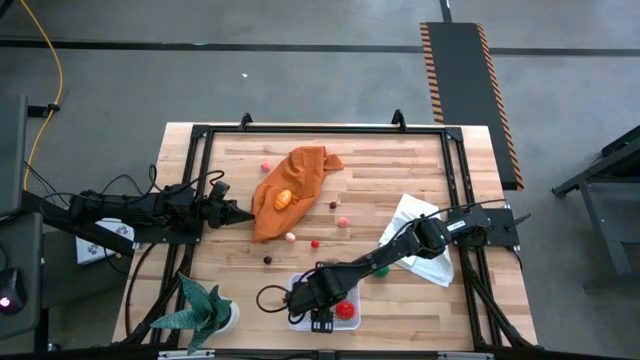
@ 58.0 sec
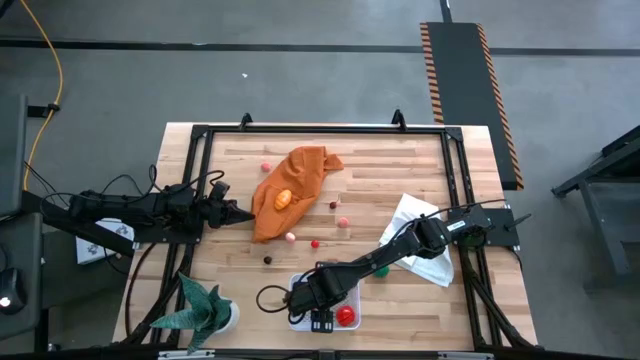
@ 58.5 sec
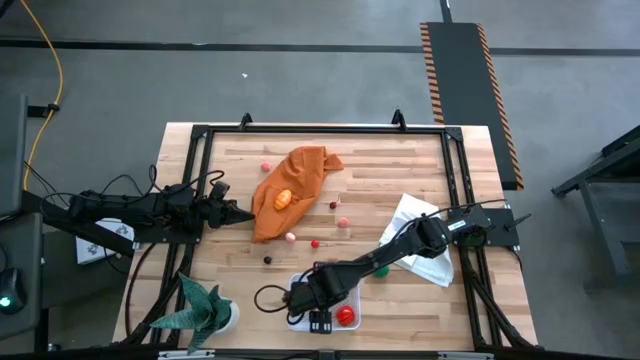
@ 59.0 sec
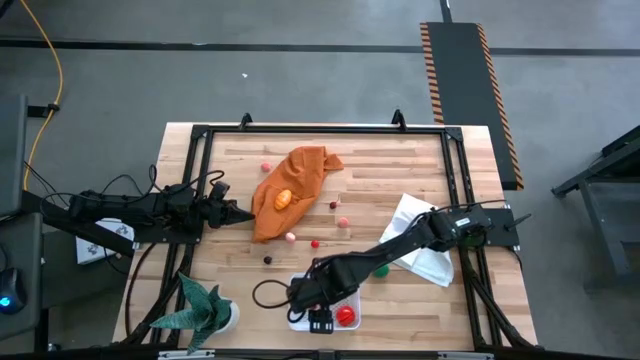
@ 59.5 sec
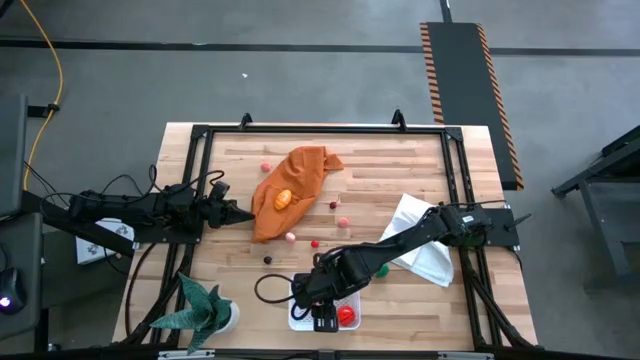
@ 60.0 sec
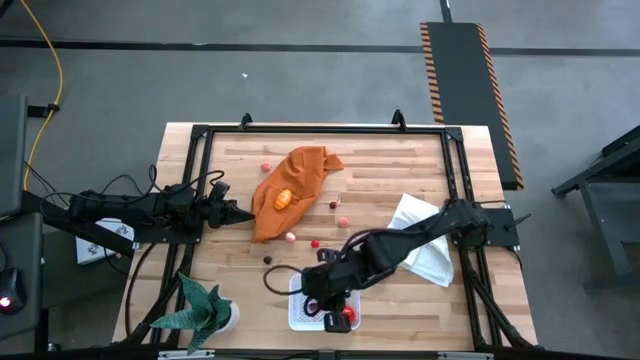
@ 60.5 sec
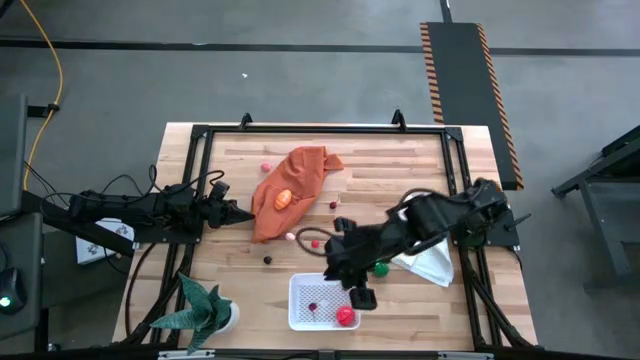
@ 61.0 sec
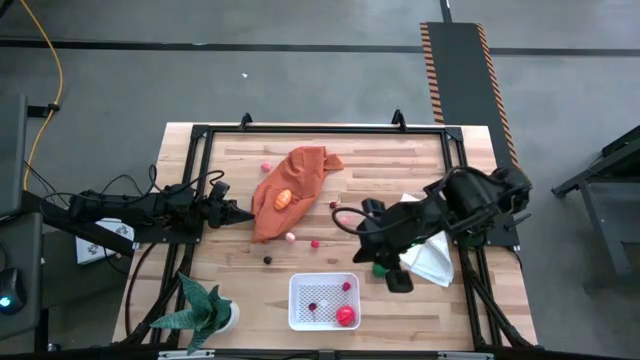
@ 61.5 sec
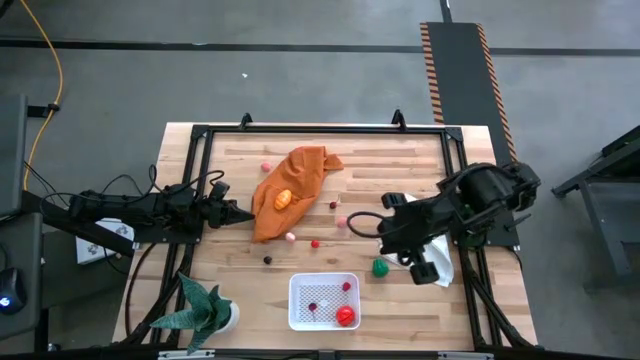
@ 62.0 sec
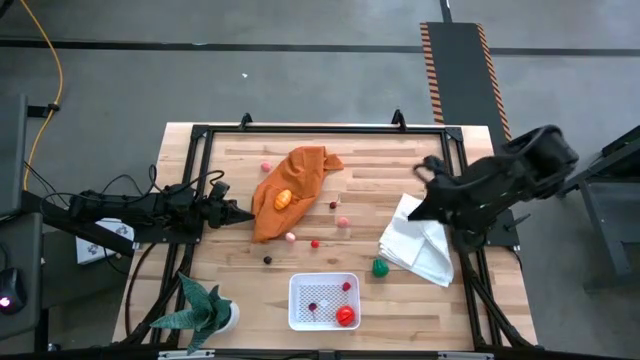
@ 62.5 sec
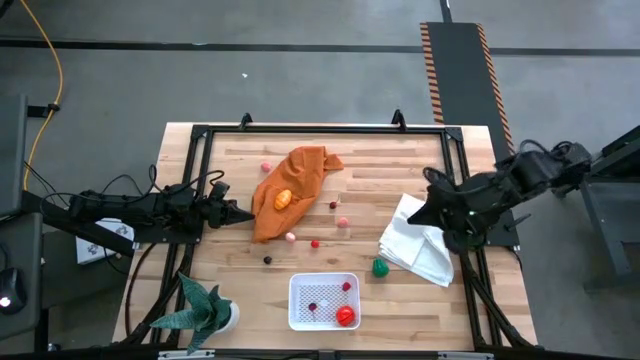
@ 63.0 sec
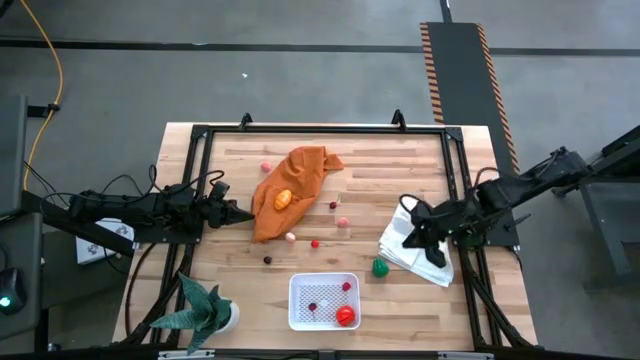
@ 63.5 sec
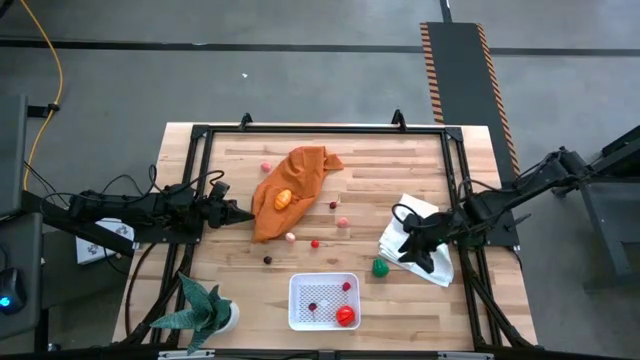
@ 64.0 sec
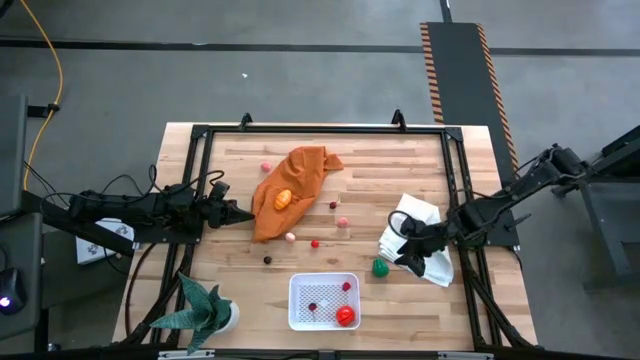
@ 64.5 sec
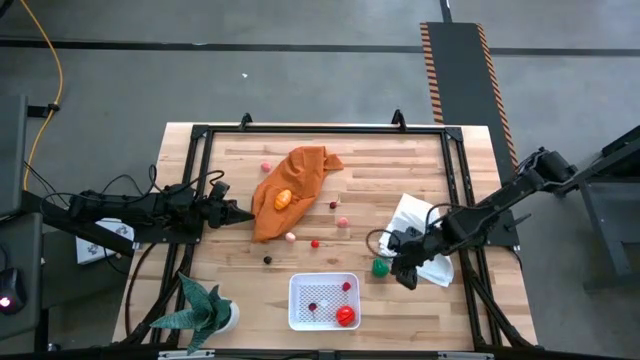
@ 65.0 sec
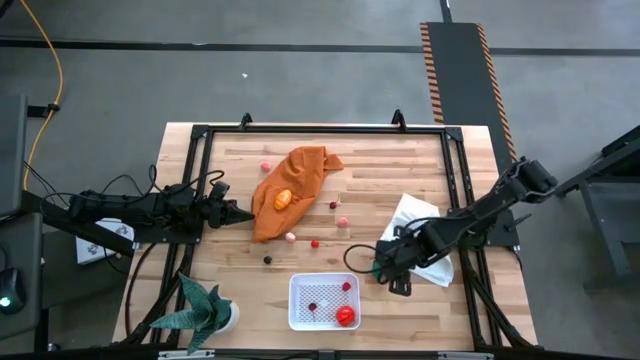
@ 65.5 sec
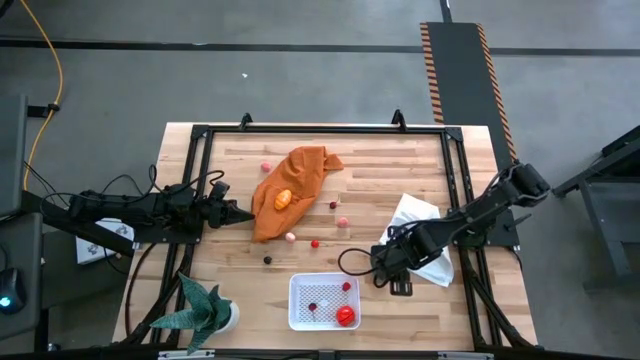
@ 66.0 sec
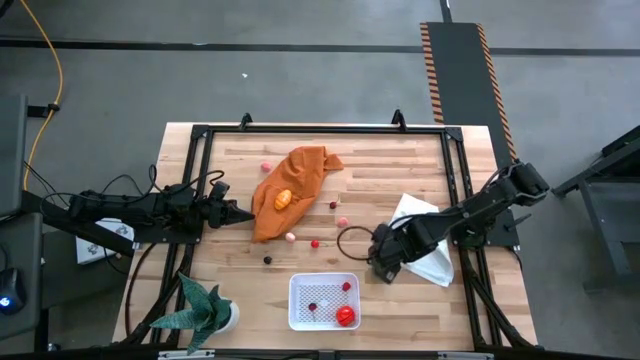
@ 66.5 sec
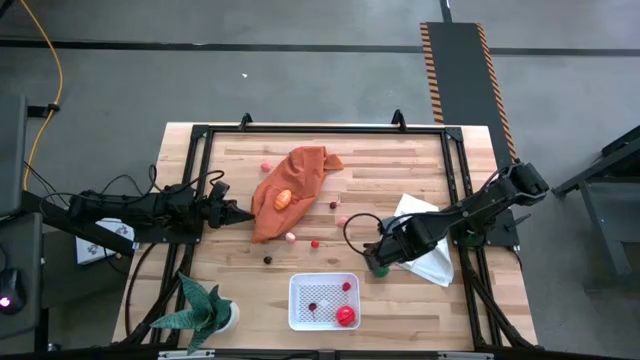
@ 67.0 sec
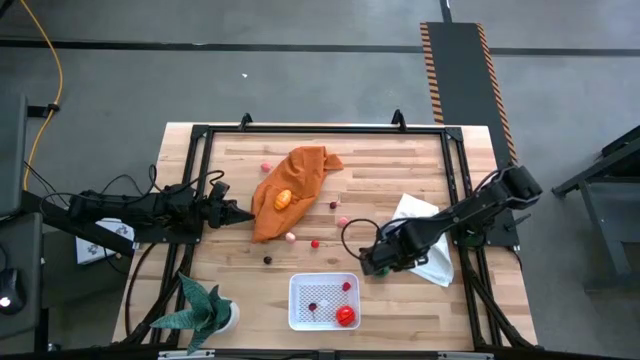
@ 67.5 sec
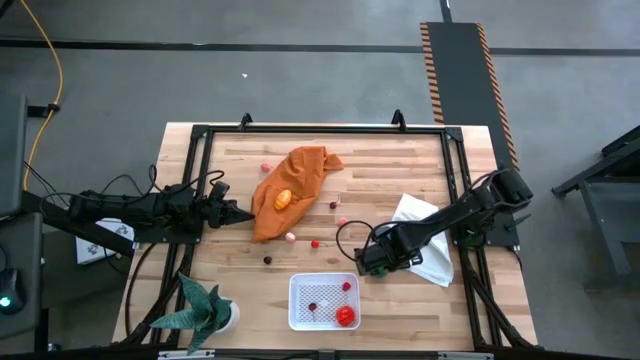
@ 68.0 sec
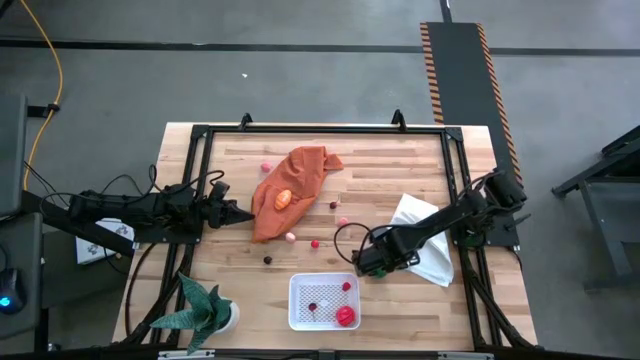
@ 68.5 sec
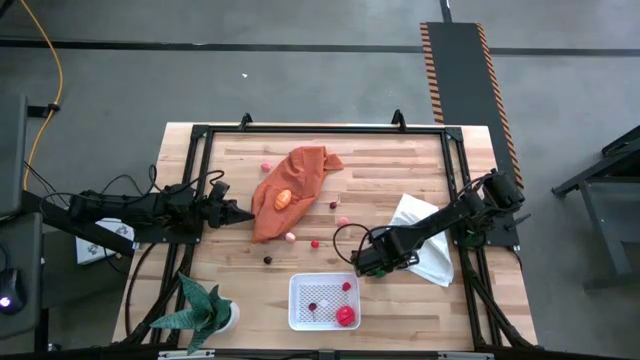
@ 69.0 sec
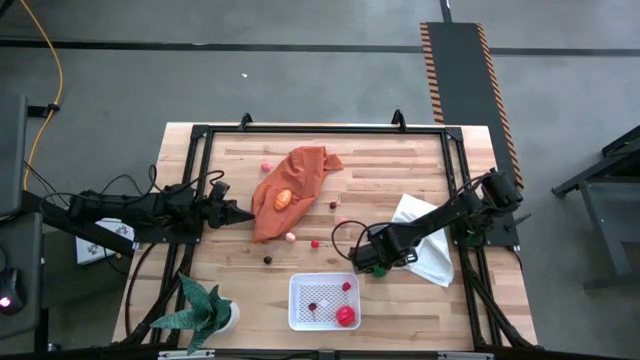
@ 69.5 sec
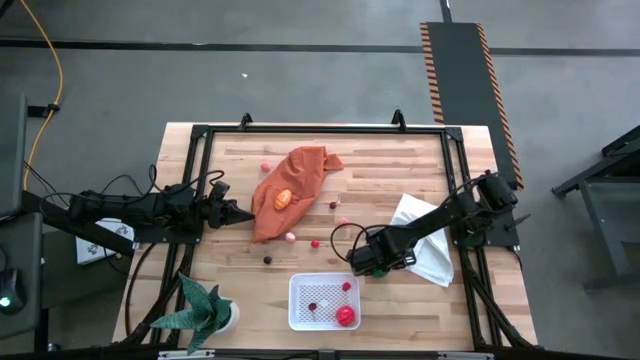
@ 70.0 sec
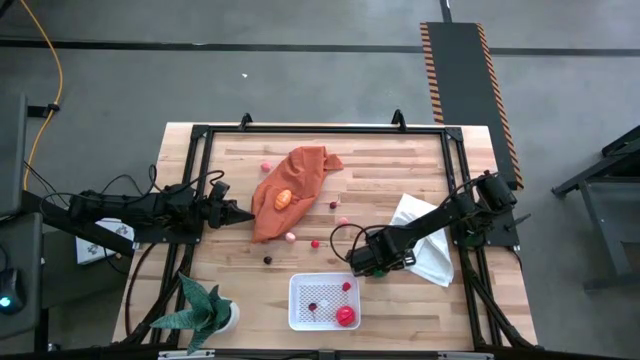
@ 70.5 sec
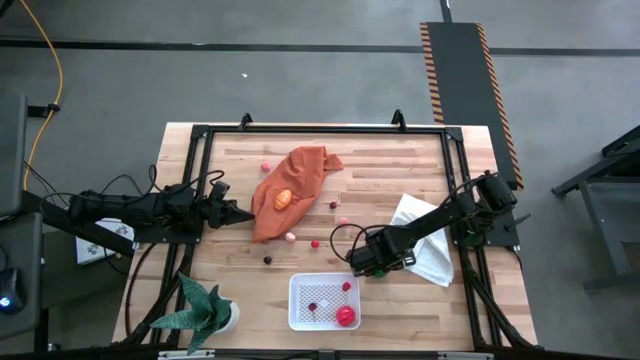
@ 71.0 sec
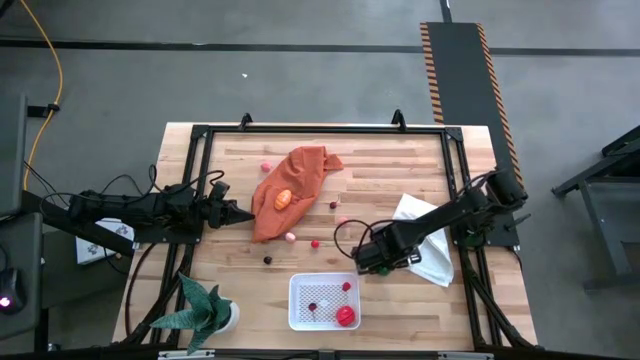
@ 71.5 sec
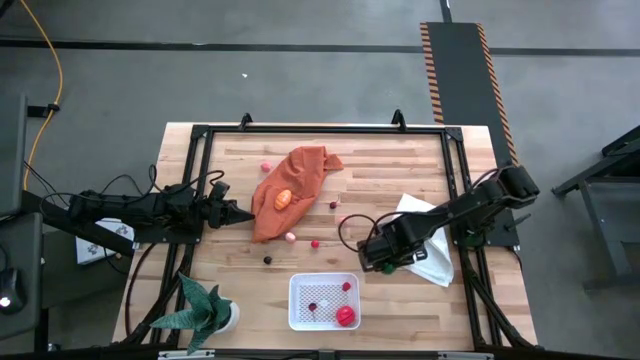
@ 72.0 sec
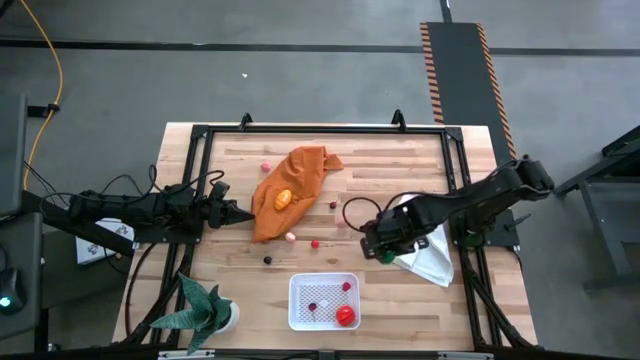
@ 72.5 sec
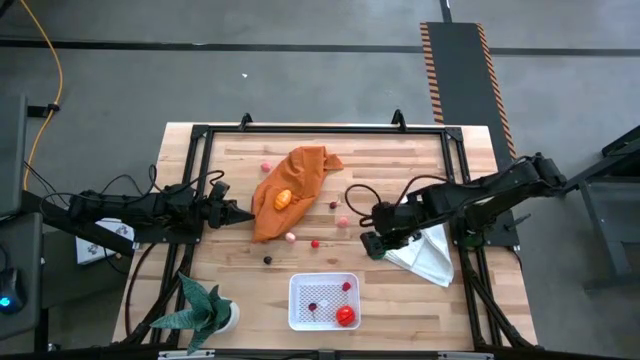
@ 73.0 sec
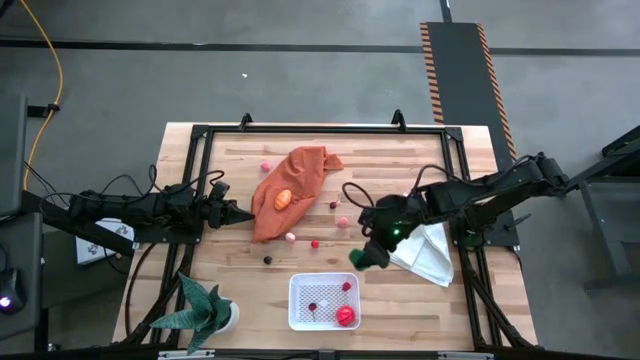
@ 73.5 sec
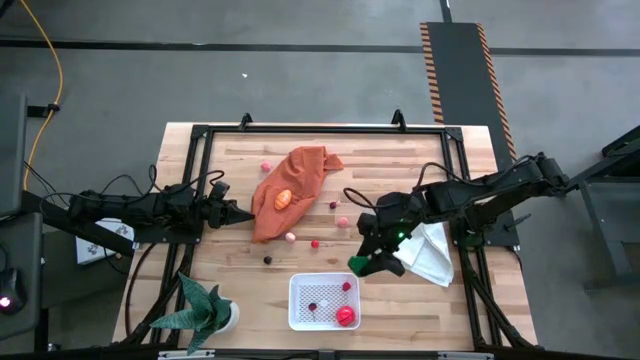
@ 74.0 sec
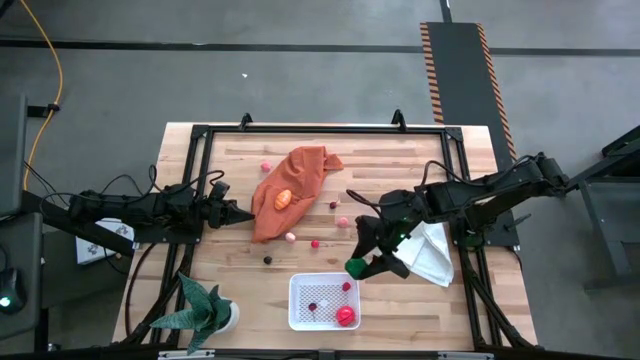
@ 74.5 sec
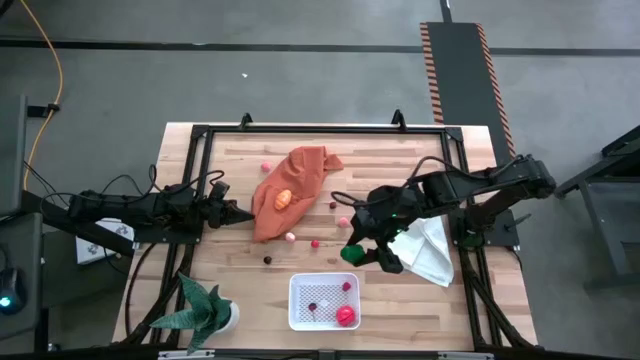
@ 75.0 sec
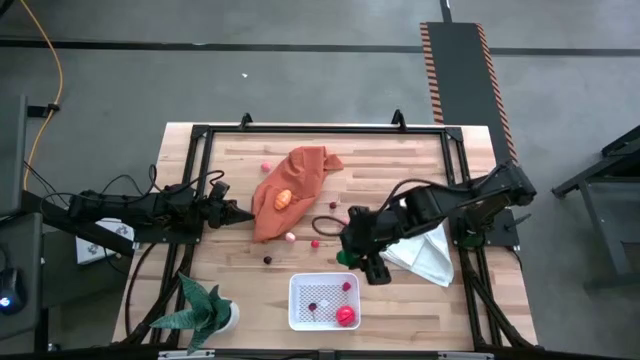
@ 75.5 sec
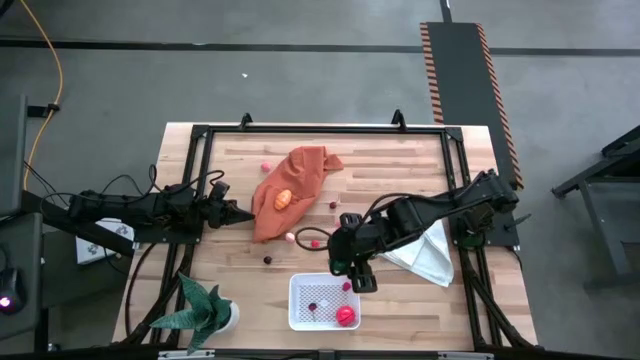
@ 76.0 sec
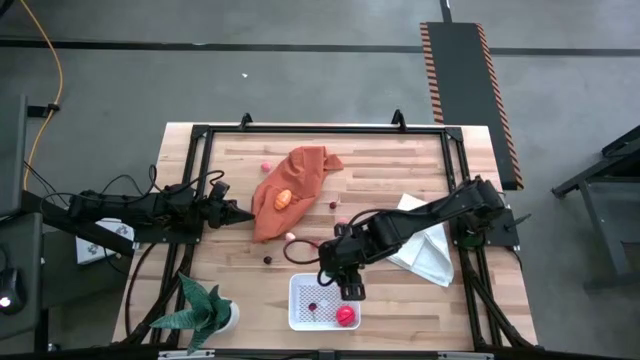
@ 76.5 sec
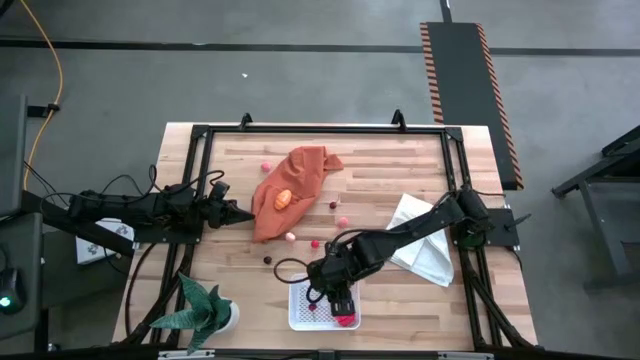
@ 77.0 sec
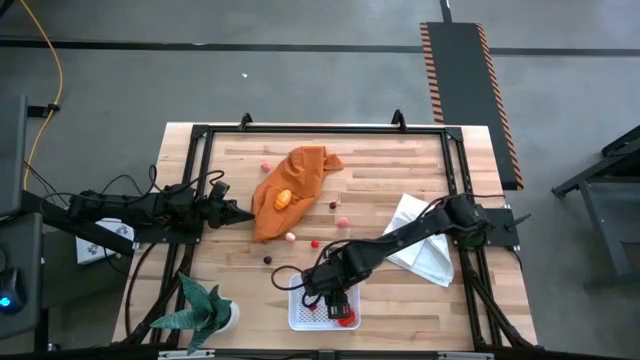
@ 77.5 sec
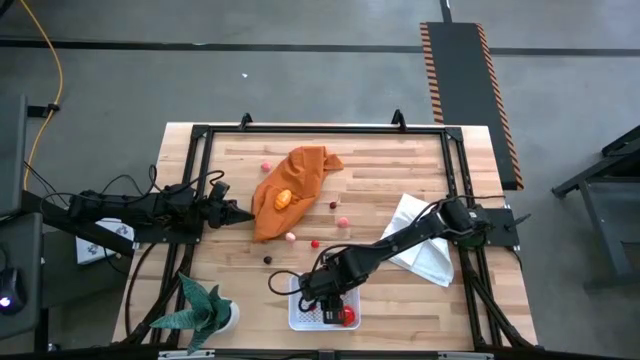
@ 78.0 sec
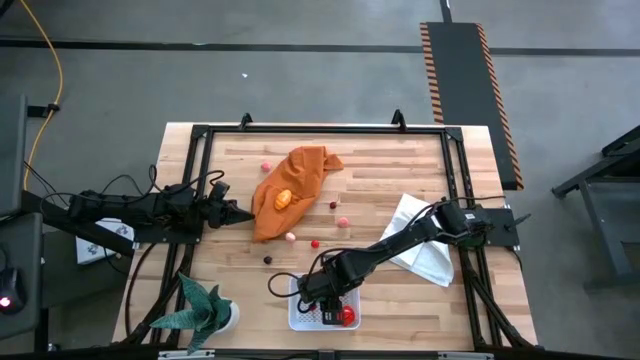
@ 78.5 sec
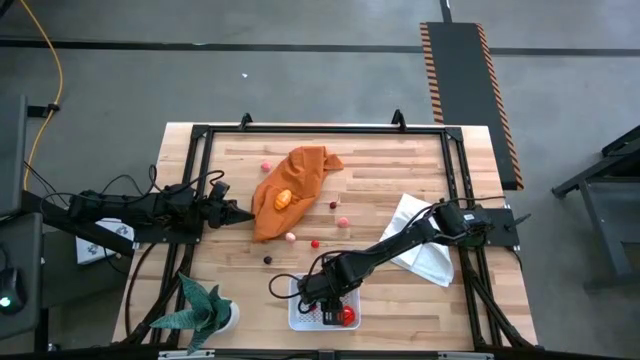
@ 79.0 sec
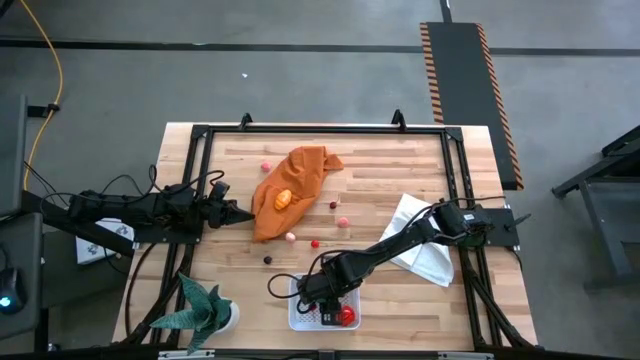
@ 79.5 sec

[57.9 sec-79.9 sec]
Task: Pick and placing Produce into tupperware
Put the green bell pepper into the white bin
